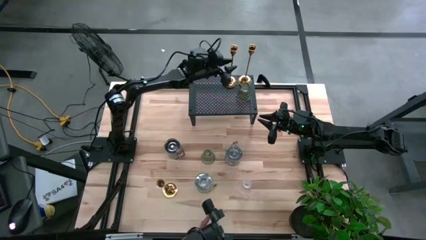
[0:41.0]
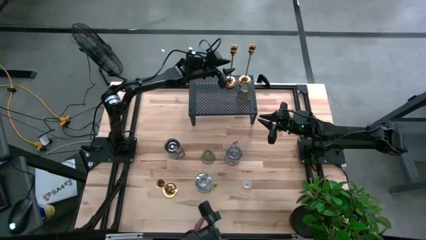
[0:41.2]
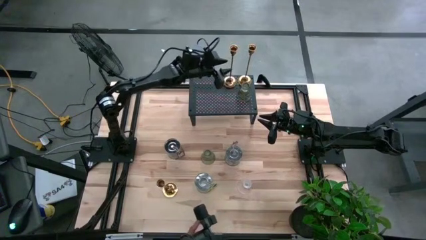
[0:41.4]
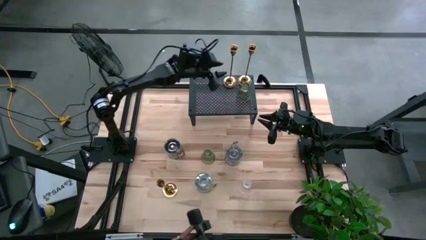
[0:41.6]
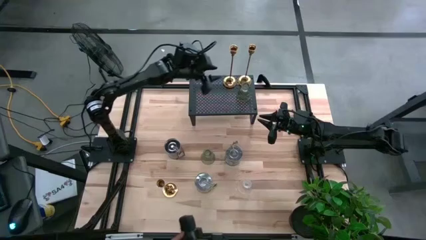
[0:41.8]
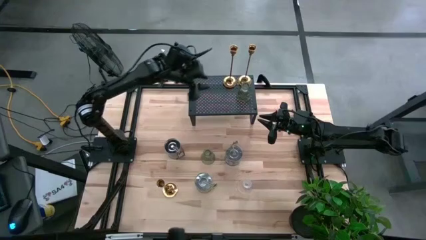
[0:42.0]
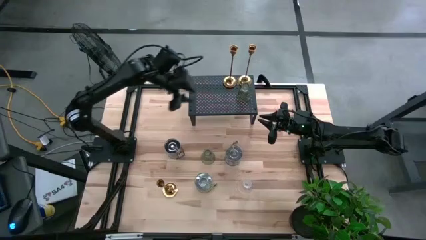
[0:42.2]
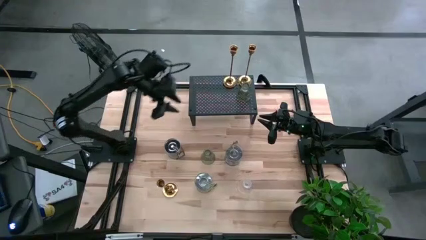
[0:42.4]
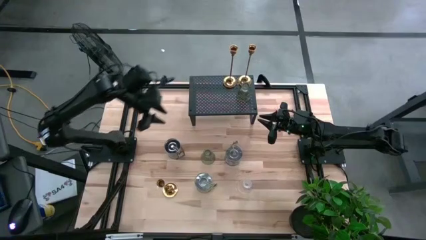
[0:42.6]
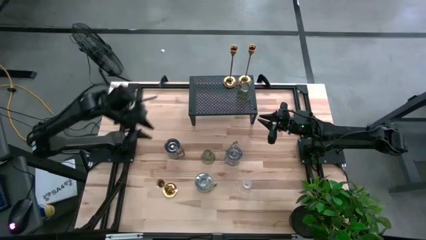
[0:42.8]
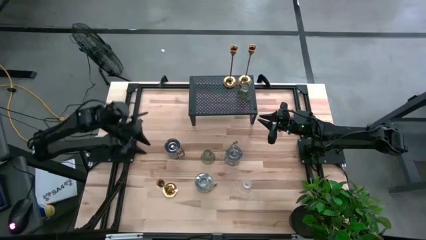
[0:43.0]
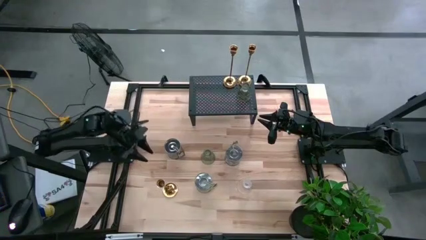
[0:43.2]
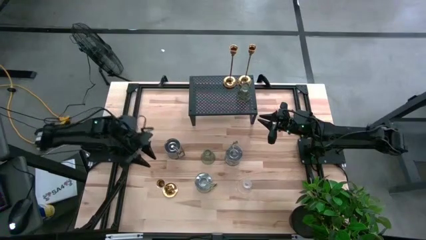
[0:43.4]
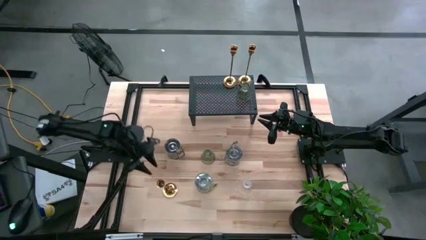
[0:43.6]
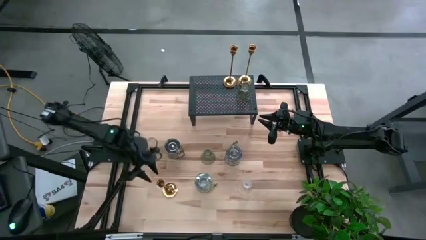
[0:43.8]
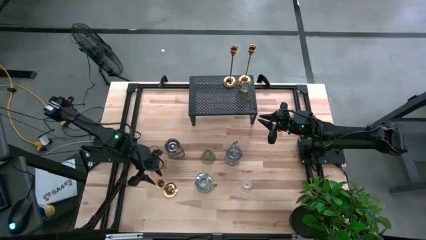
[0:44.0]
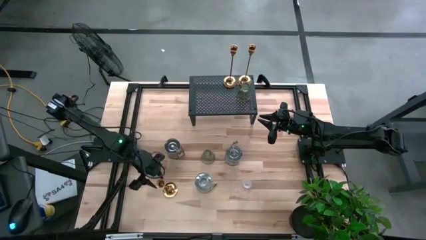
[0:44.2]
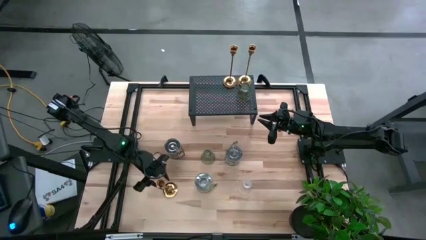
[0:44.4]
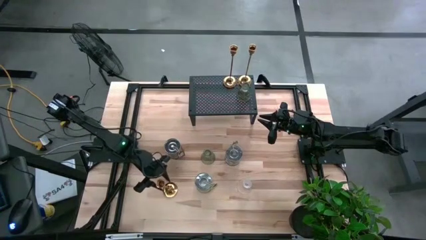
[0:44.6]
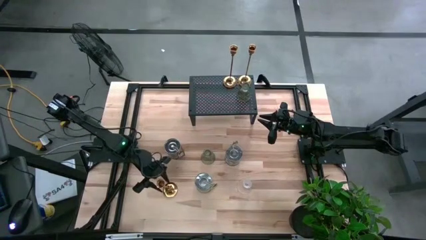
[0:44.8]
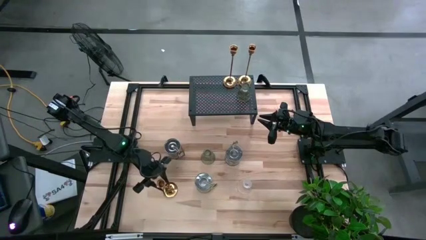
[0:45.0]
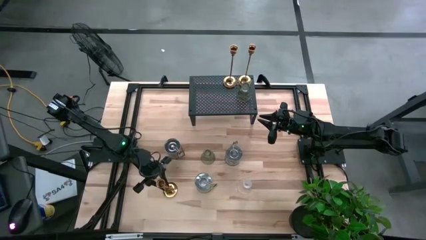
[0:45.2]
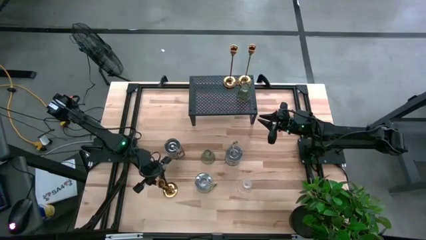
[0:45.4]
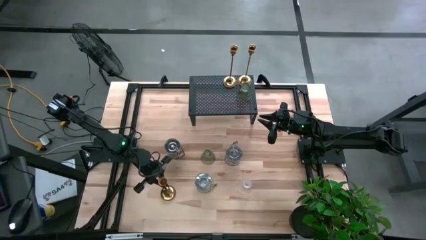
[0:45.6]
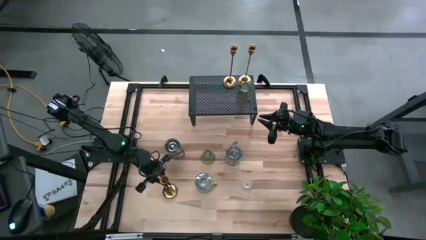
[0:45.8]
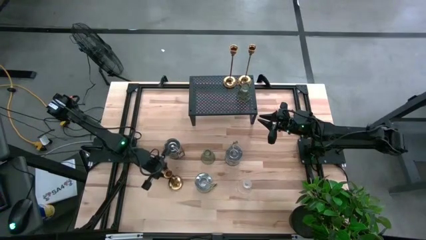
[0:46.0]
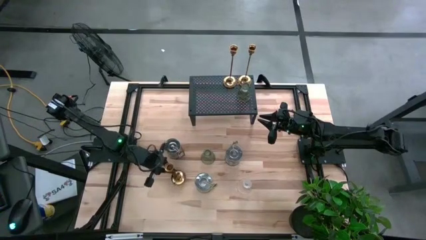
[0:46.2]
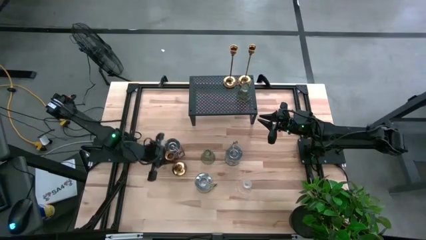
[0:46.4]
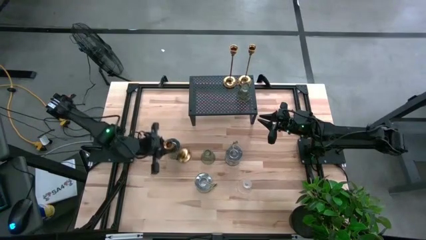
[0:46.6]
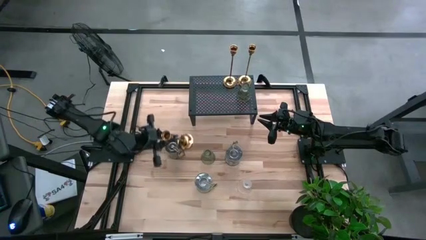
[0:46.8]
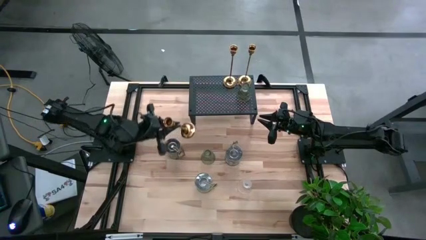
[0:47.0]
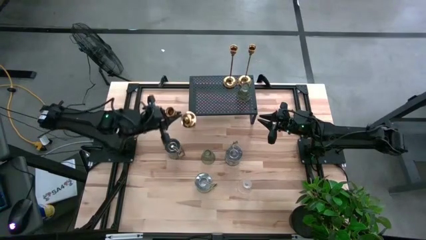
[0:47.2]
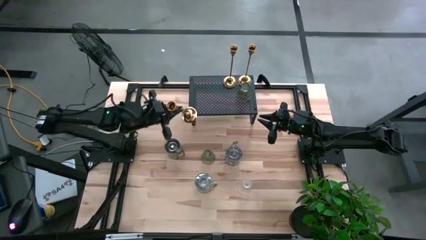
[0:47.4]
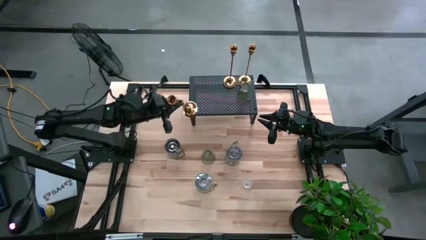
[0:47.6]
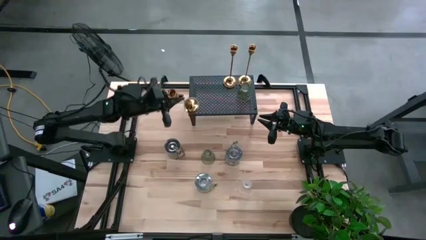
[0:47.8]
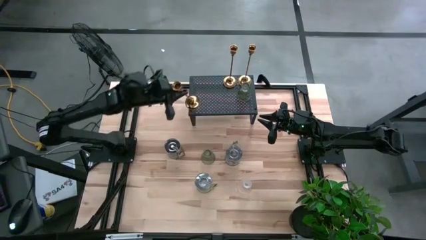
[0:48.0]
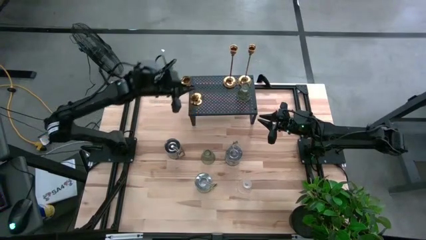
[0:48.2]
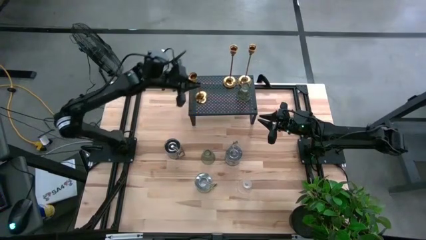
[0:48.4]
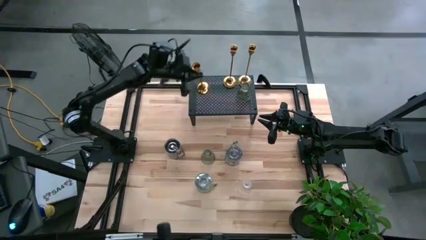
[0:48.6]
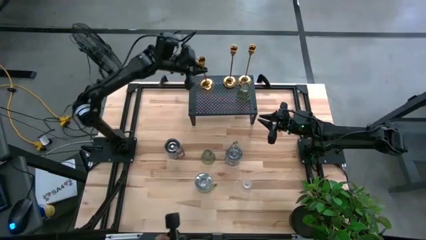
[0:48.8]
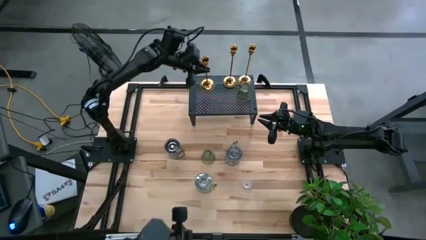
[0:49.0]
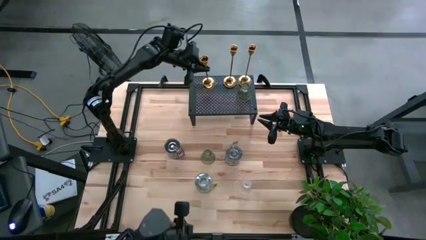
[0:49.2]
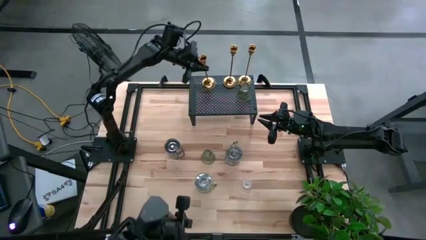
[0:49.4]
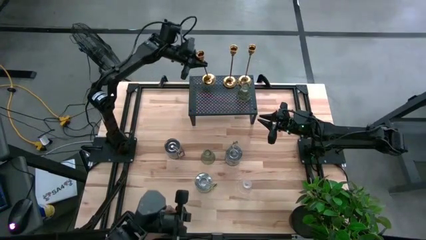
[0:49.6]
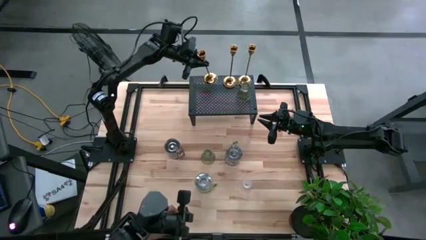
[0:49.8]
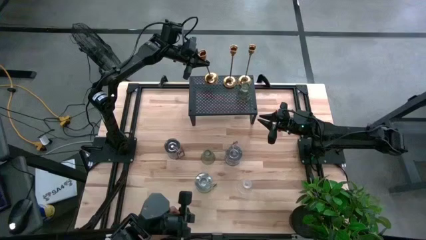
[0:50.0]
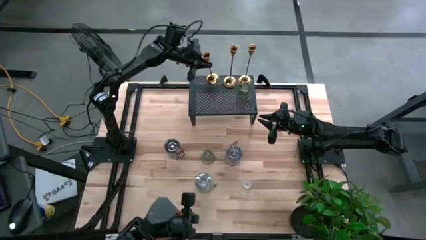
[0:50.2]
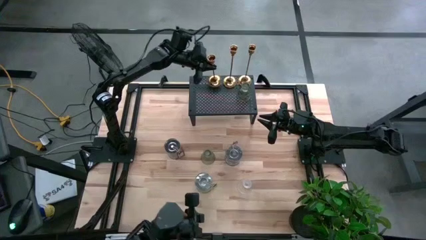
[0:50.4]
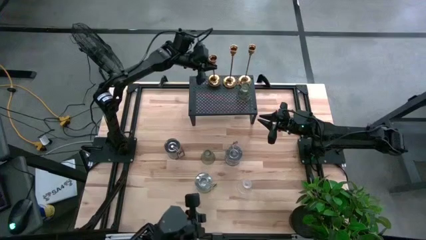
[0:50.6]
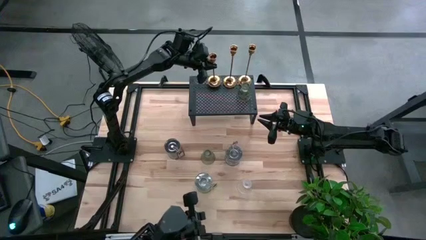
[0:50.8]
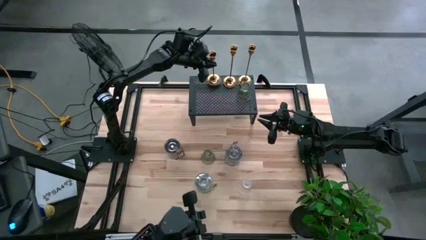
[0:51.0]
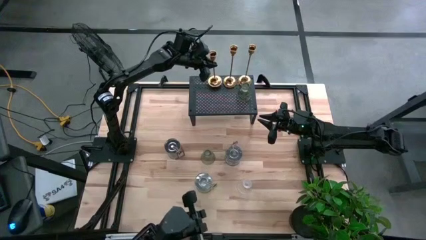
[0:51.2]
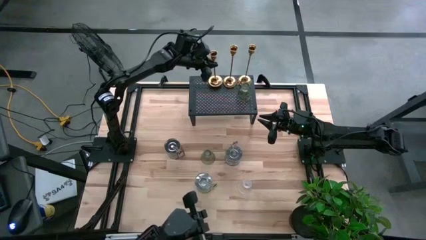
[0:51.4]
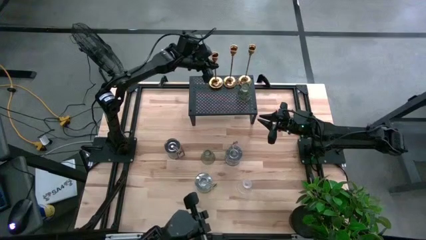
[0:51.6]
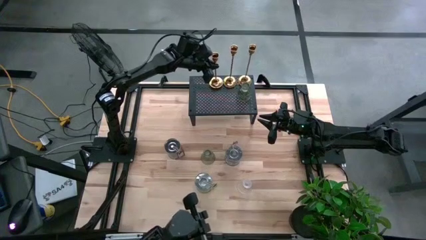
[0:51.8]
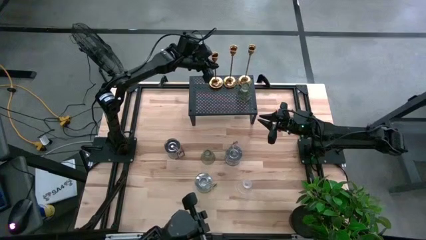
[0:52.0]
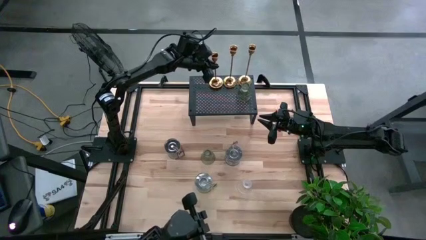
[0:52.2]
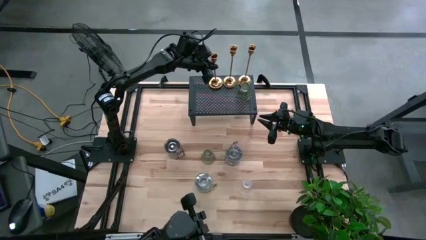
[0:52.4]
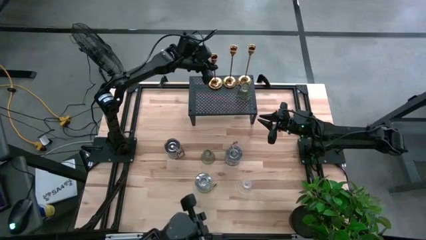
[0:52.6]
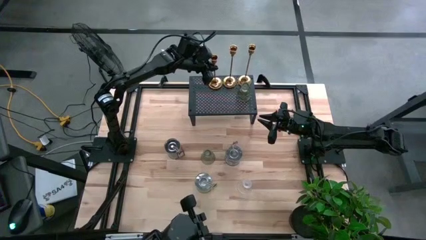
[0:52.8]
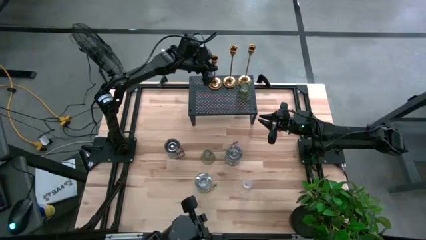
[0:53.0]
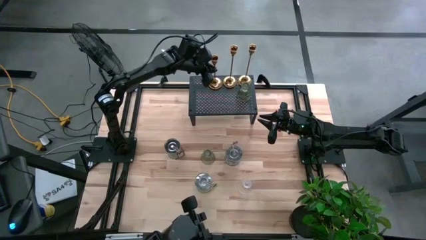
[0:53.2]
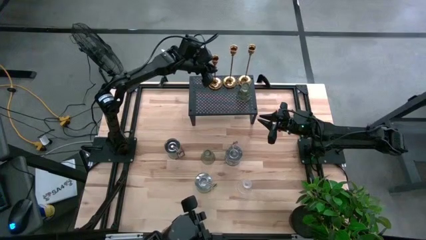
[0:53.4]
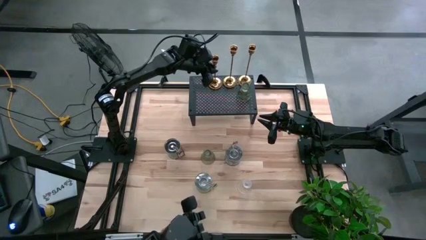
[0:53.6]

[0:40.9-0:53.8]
Task: Pick & Place candle stick holders
Put the gold candle holder on the shelf aligned with the gold candle holders
